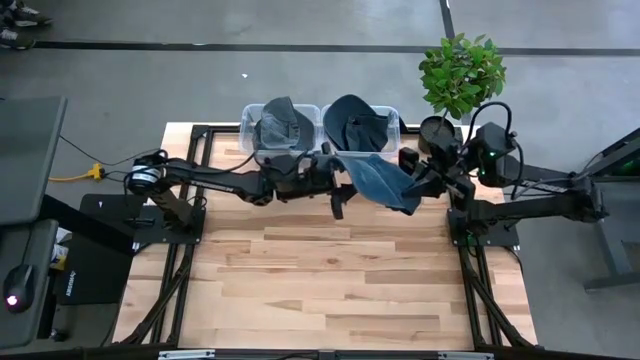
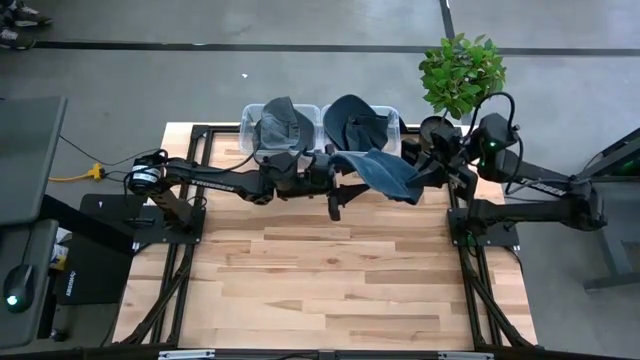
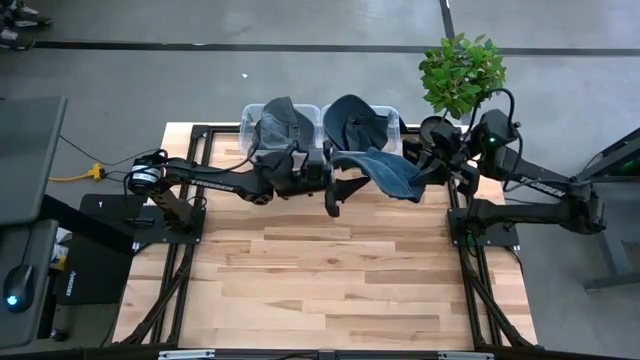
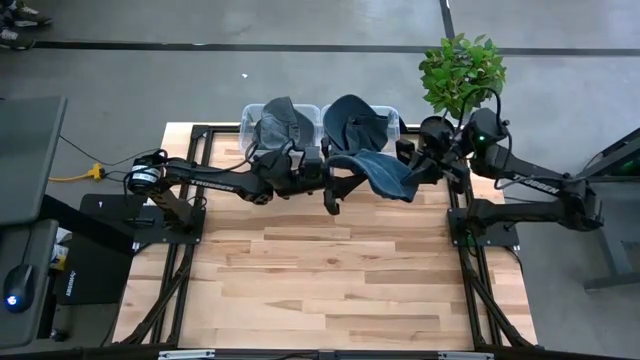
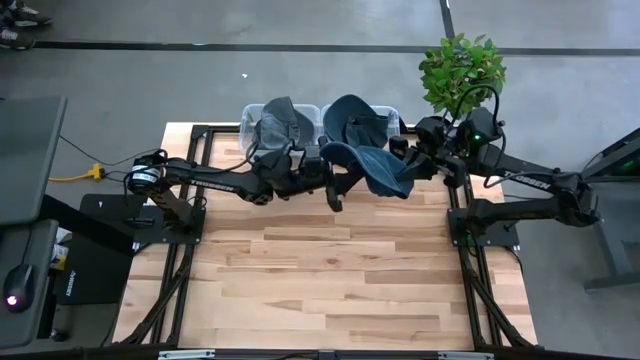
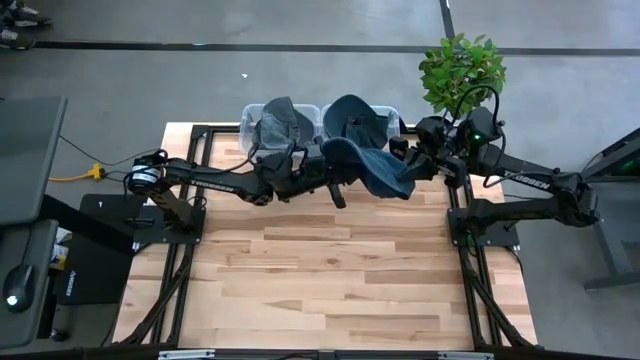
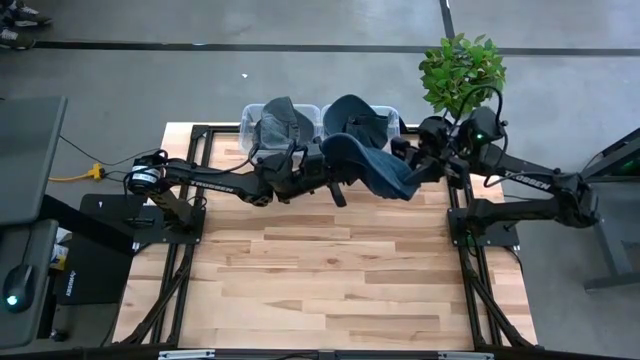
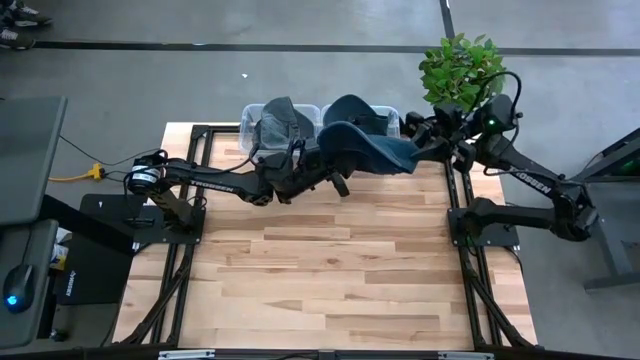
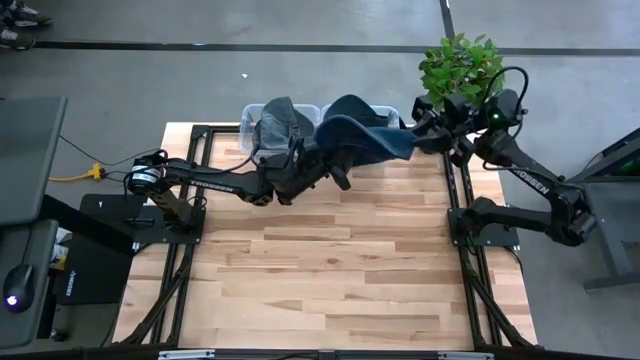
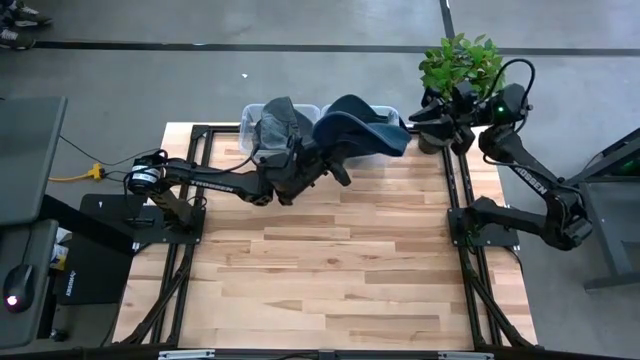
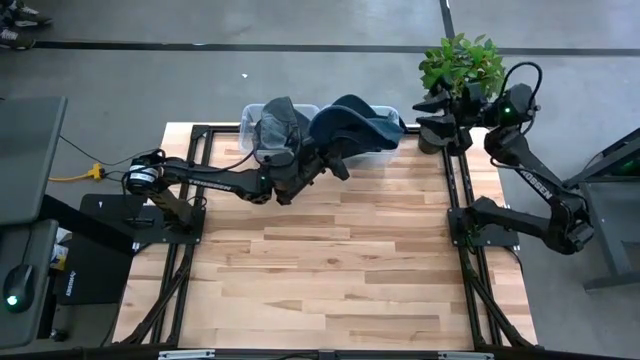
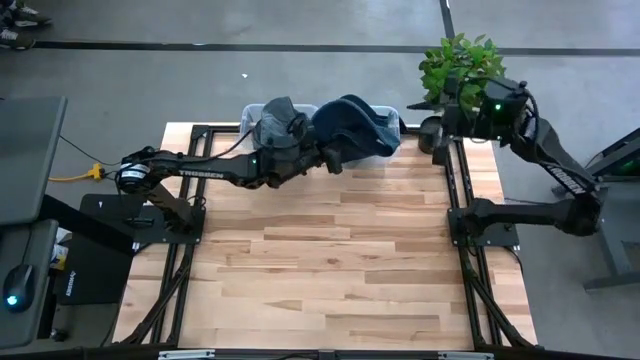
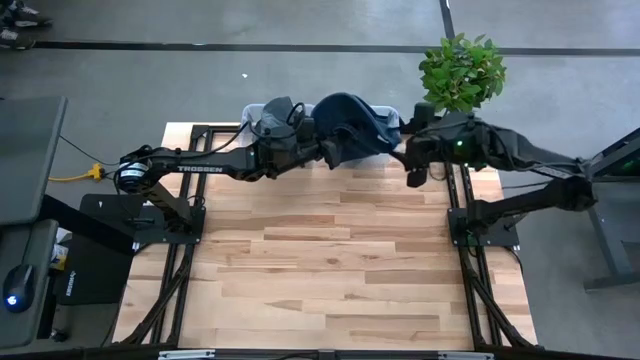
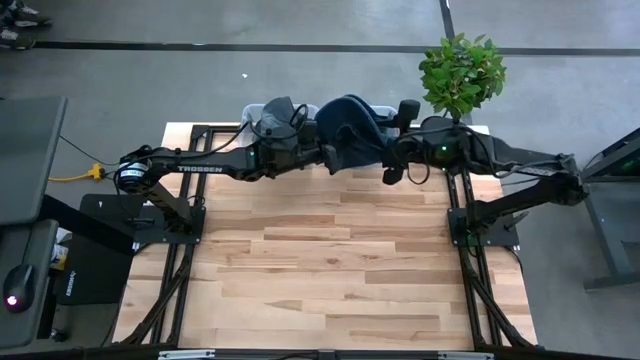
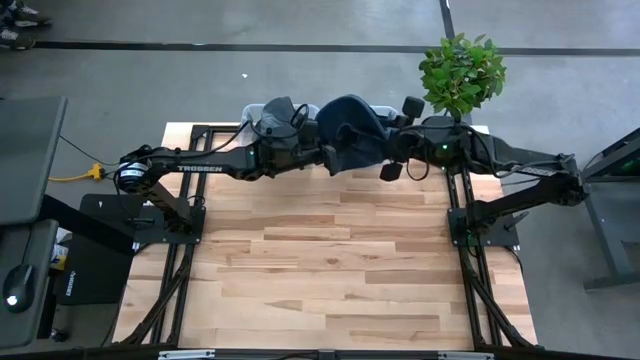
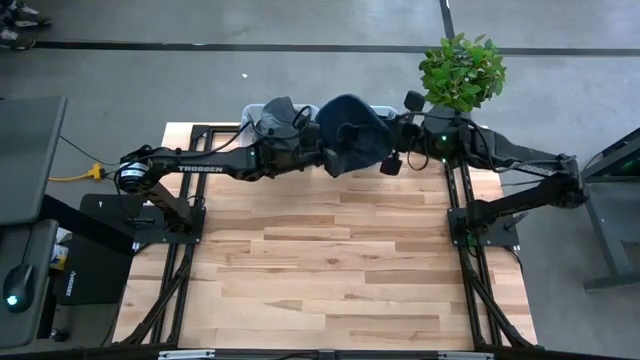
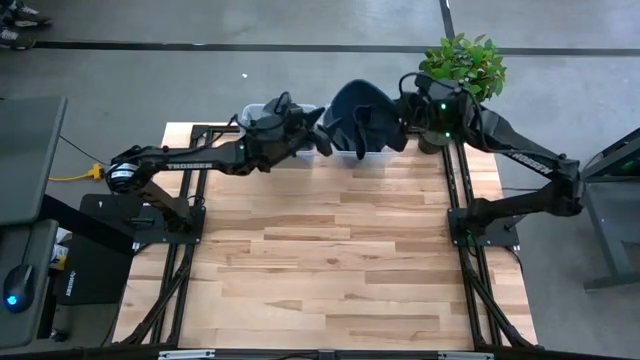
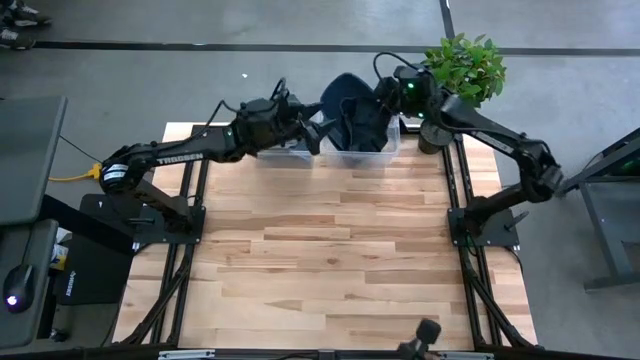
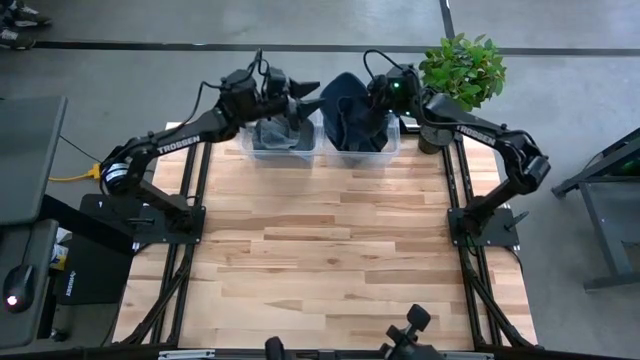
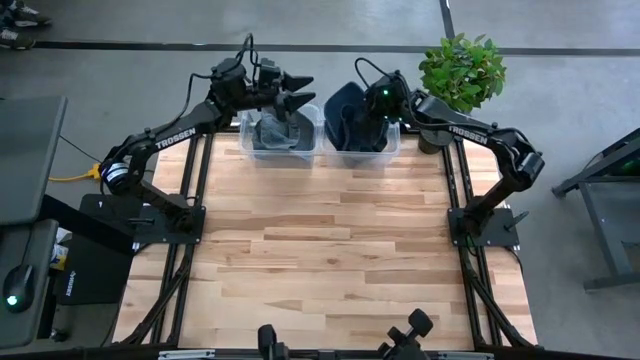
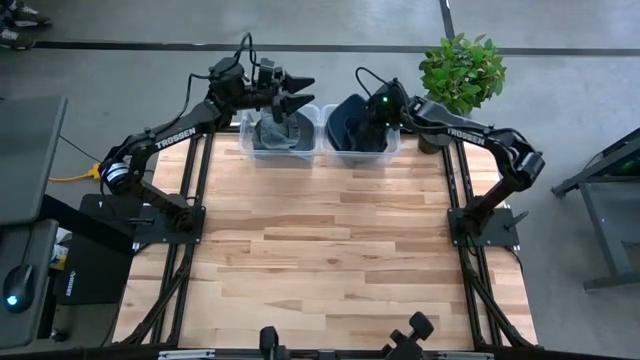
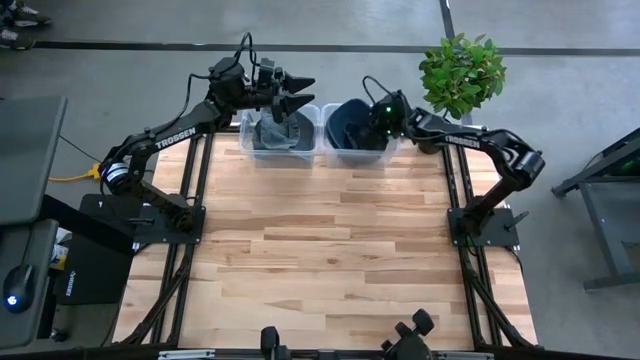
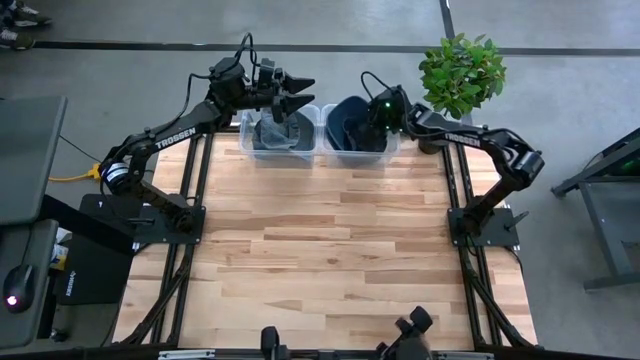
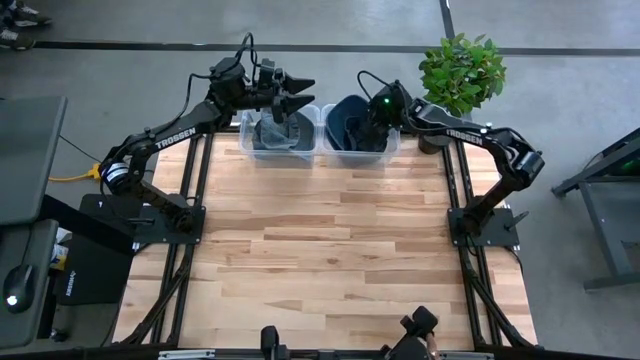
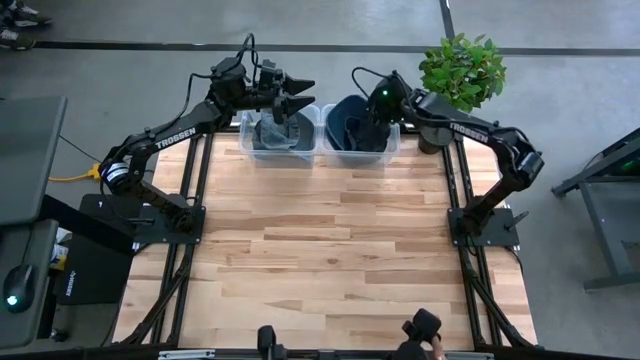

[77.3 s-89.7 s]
Task: Pick and place caps into container
Put the blue cap into the right transparent container

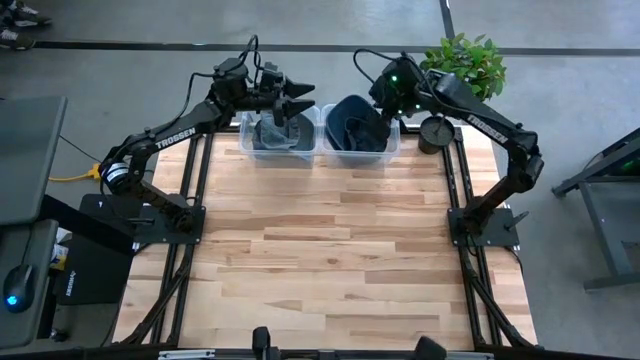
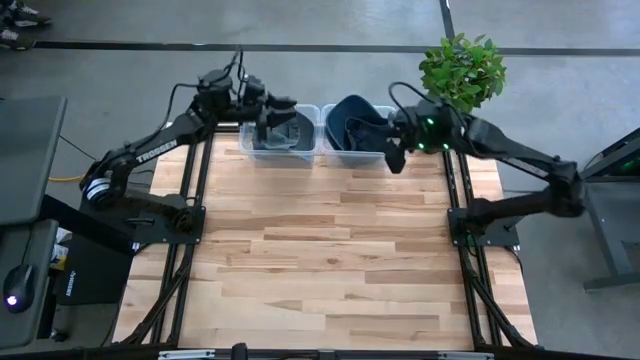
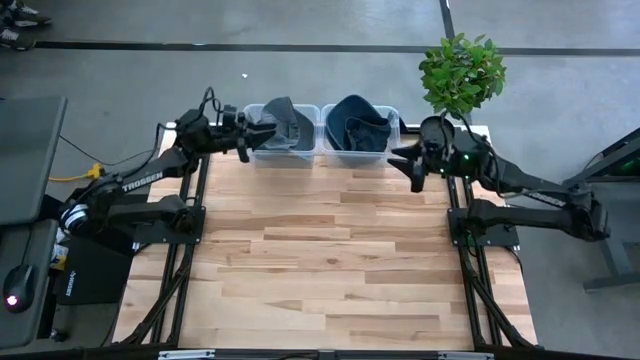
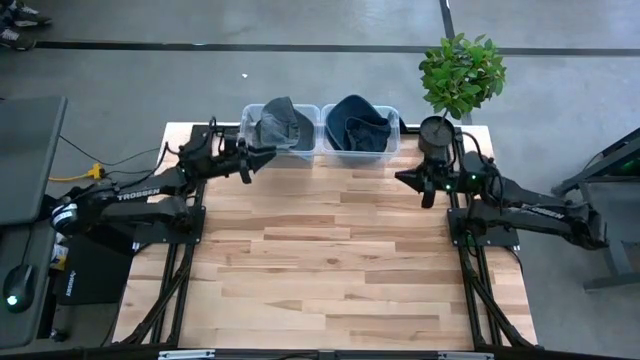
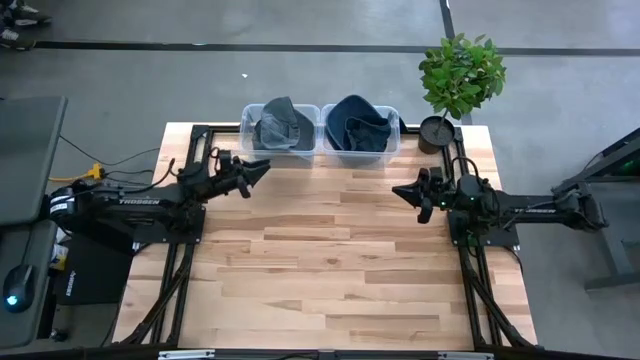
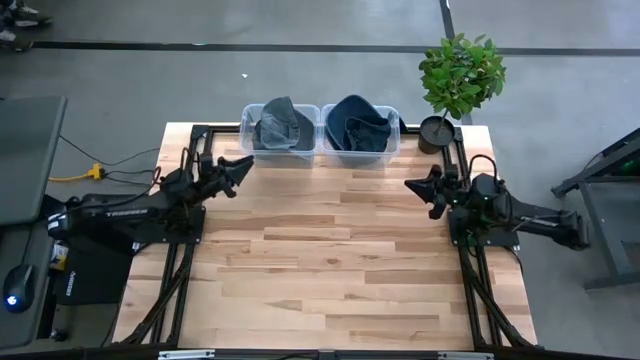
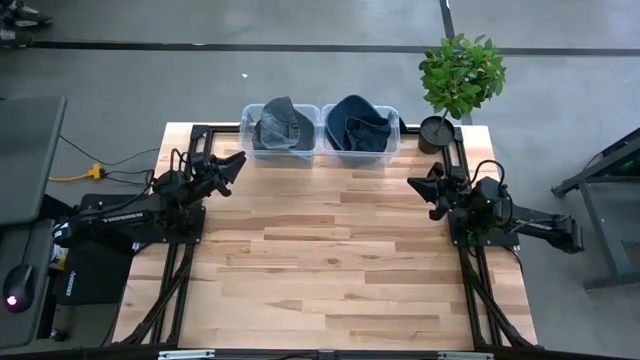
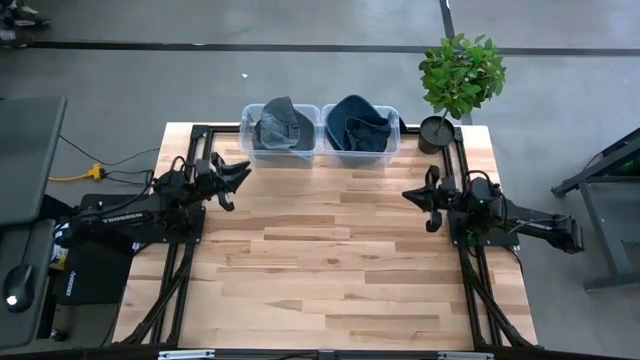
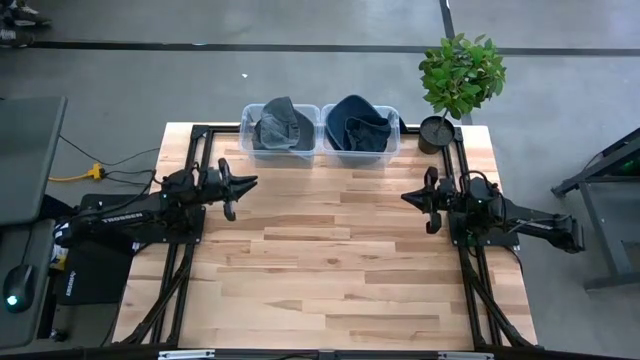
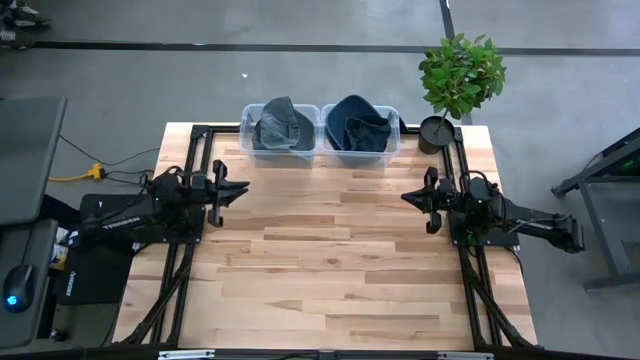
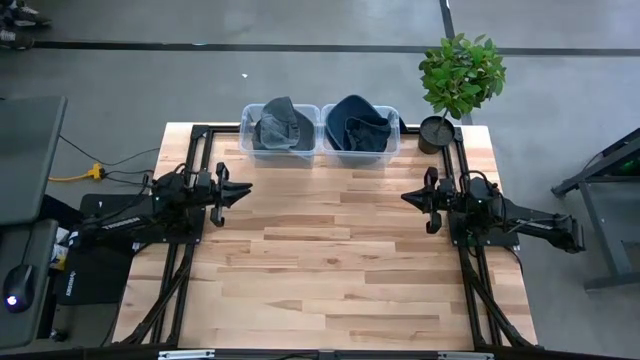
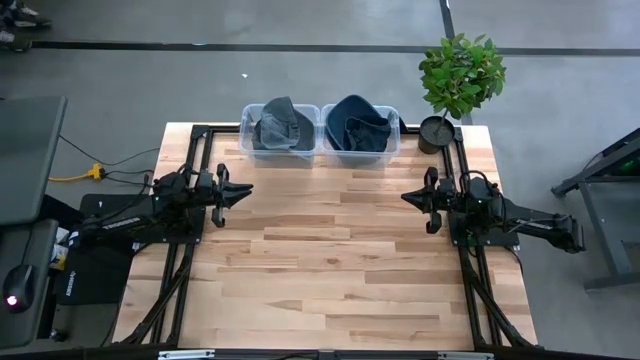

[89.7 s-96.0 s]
Return to Home Position

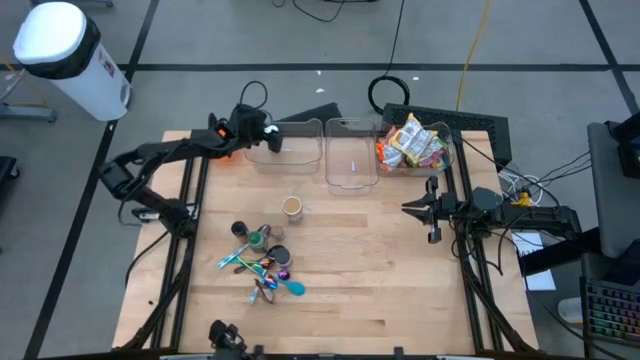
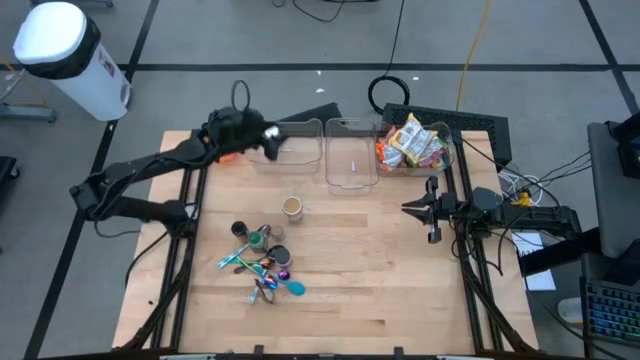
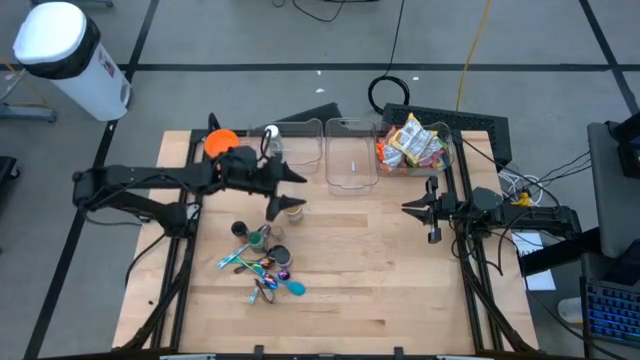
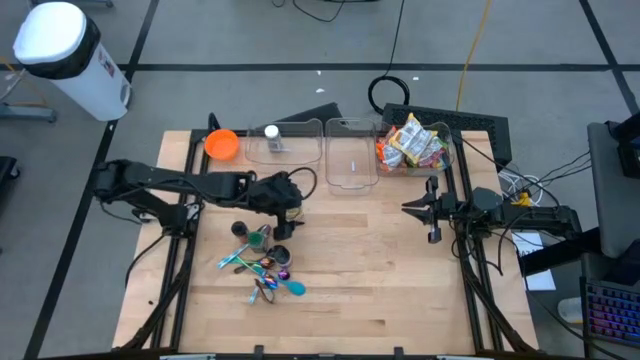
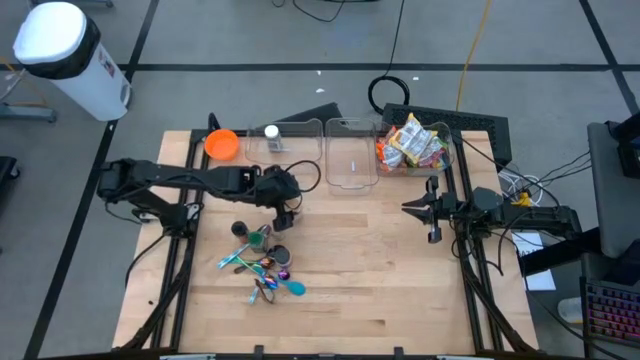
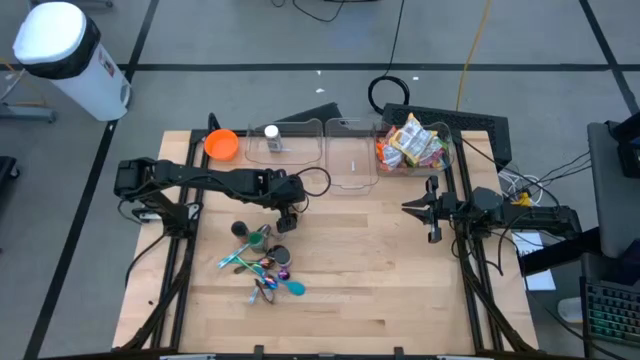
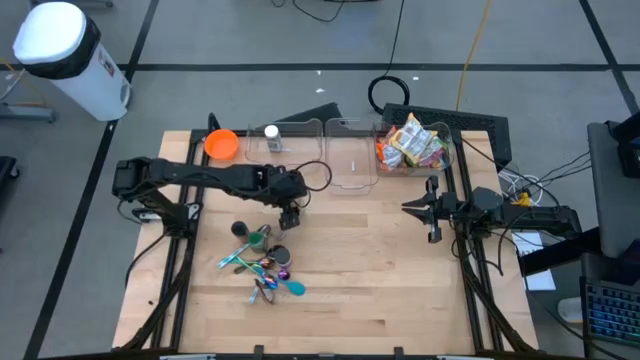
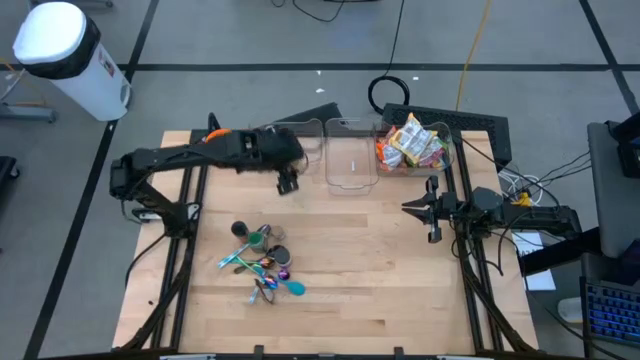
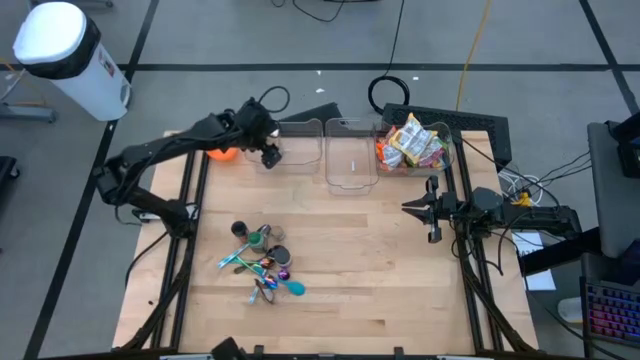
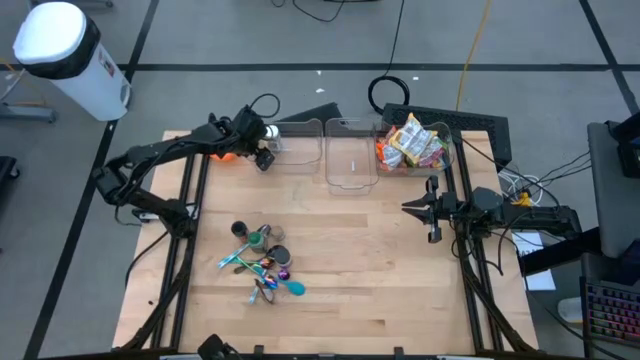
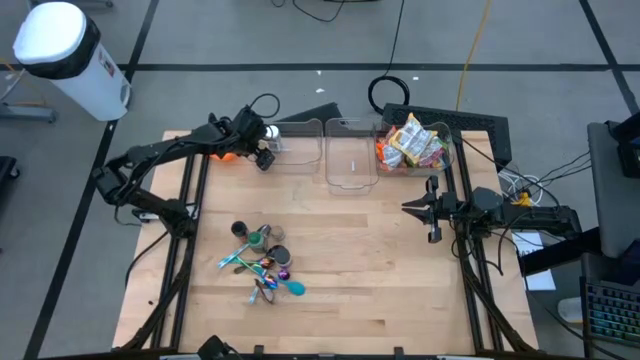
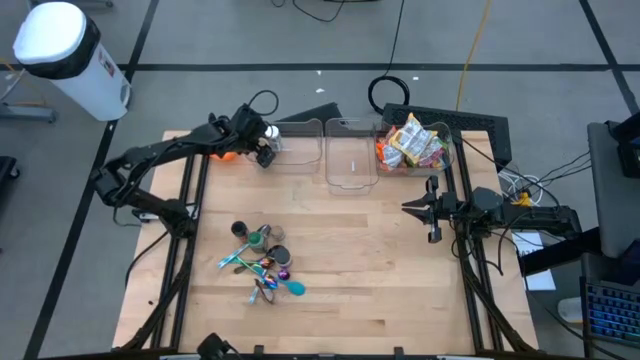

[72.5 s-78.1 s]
Task: Pick & Place Food Item
Put the golden seasoning bottle into the left transparent bin
